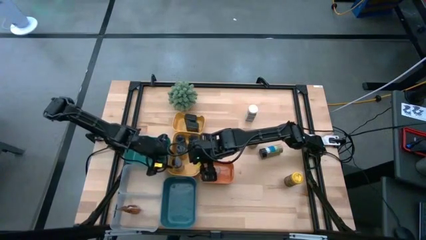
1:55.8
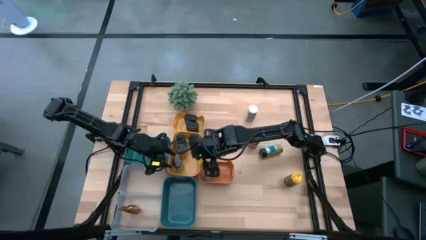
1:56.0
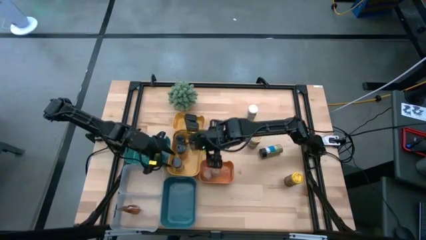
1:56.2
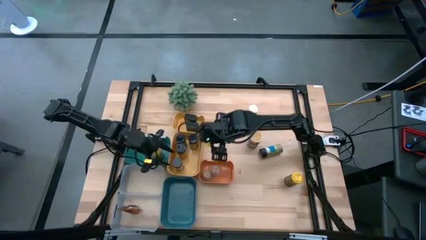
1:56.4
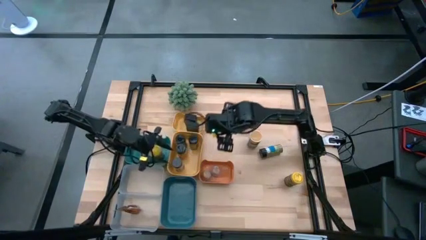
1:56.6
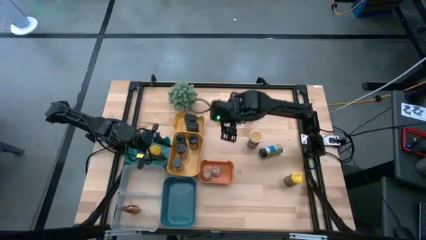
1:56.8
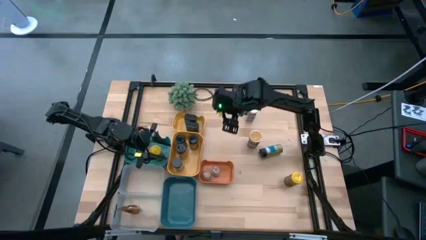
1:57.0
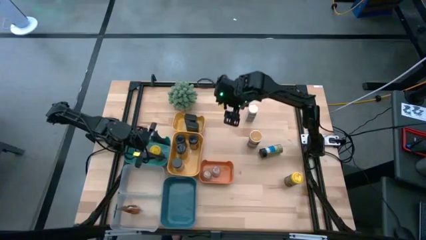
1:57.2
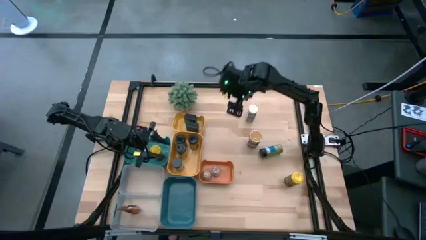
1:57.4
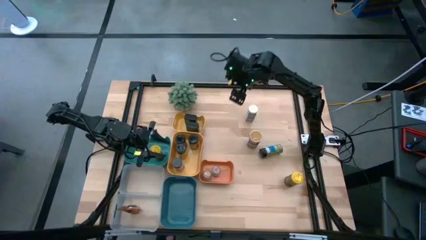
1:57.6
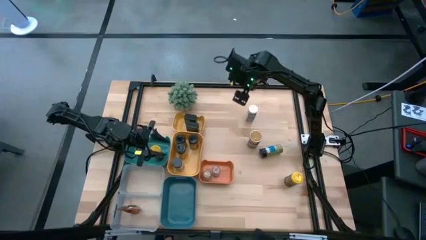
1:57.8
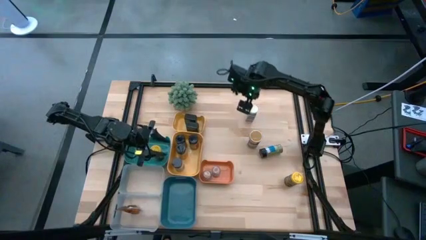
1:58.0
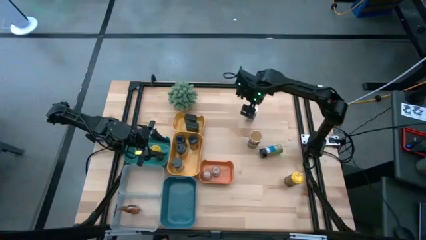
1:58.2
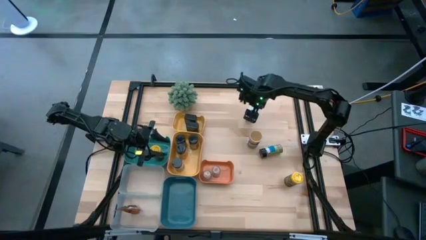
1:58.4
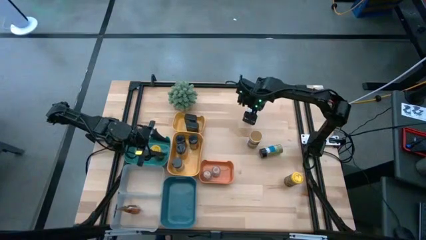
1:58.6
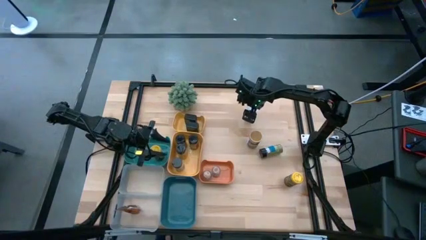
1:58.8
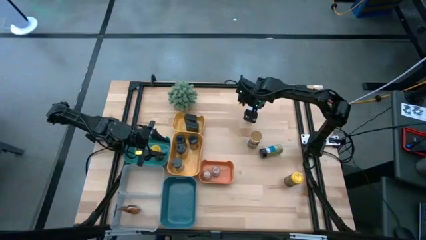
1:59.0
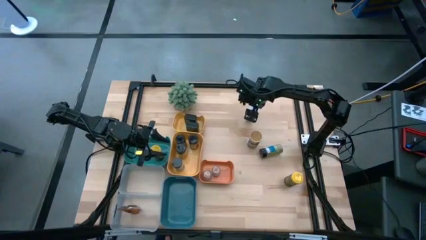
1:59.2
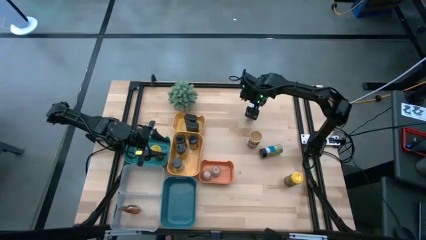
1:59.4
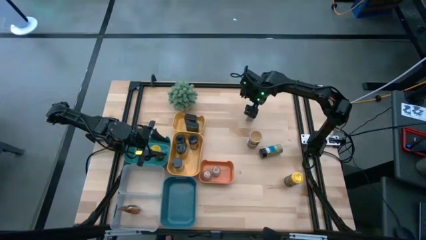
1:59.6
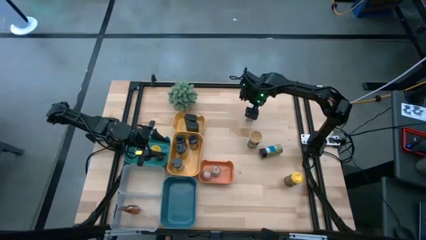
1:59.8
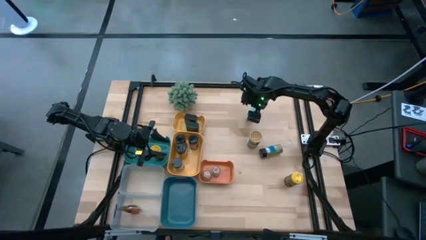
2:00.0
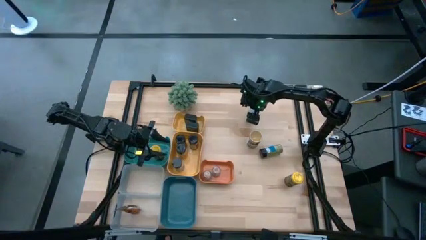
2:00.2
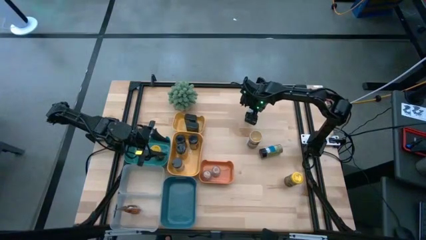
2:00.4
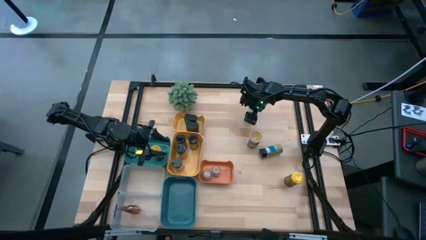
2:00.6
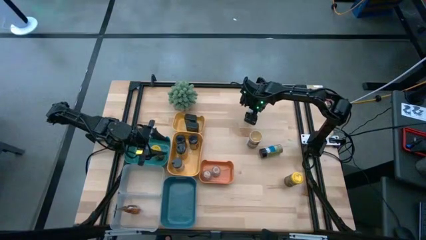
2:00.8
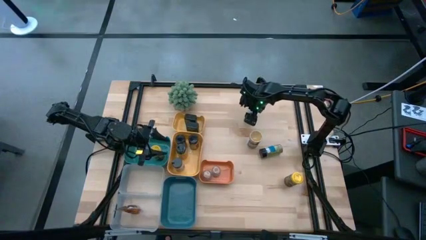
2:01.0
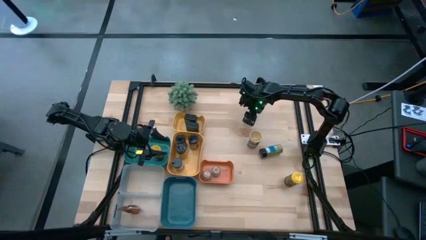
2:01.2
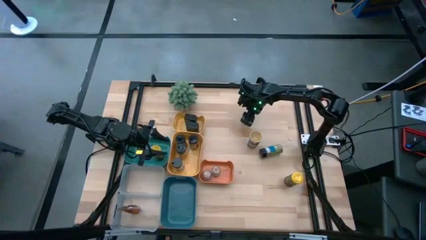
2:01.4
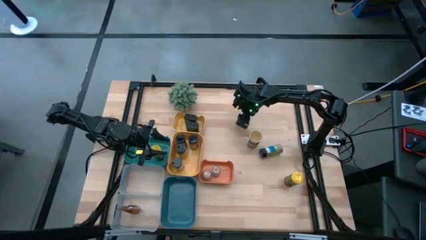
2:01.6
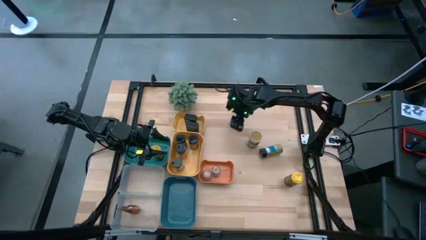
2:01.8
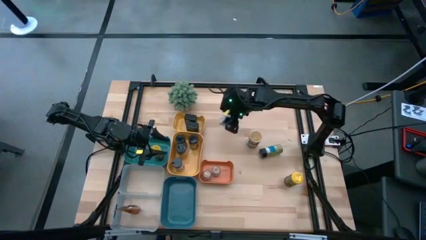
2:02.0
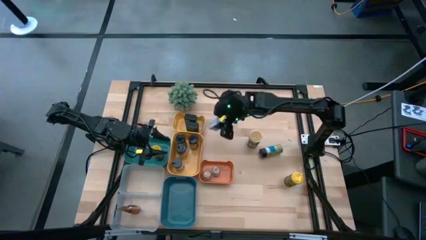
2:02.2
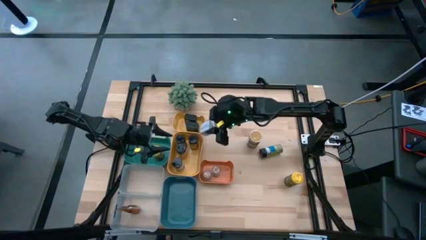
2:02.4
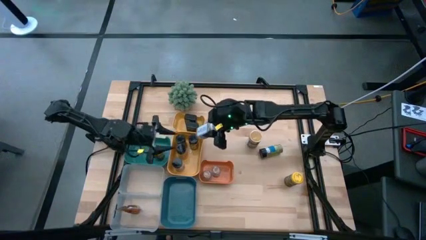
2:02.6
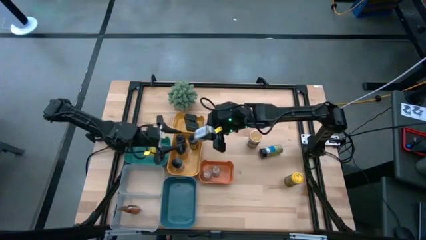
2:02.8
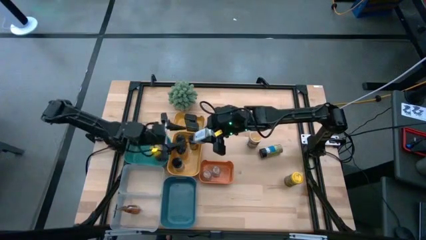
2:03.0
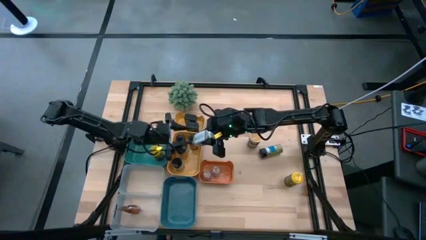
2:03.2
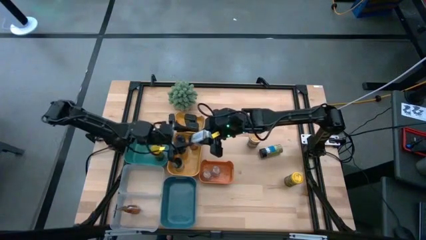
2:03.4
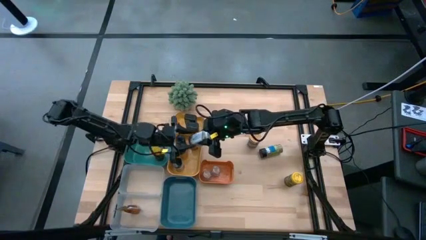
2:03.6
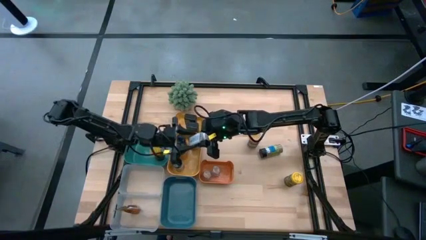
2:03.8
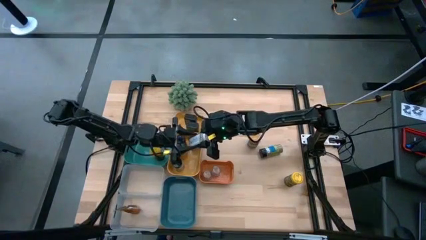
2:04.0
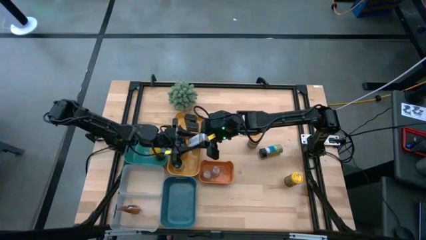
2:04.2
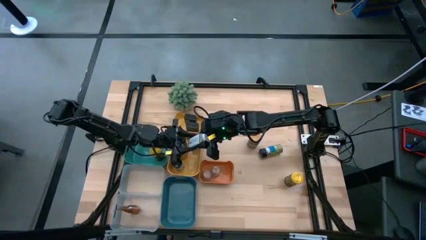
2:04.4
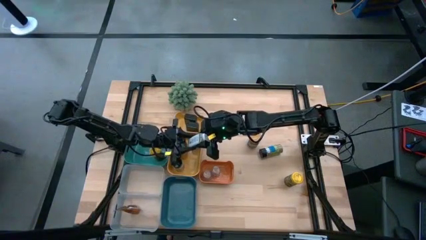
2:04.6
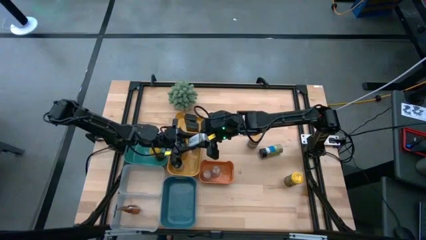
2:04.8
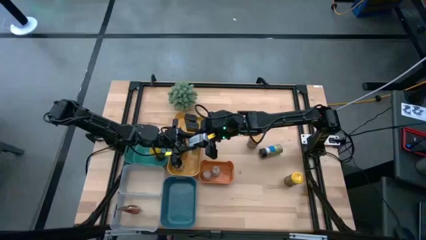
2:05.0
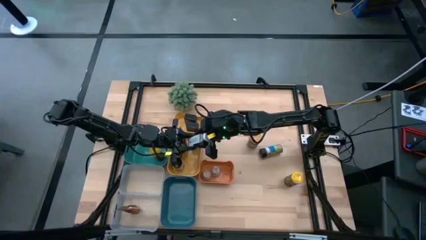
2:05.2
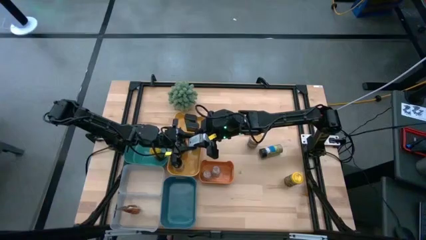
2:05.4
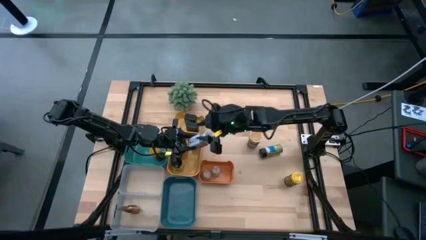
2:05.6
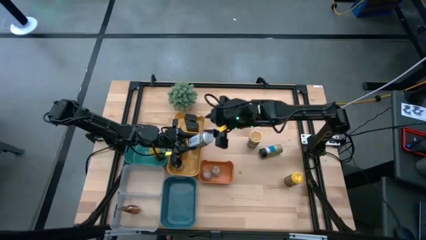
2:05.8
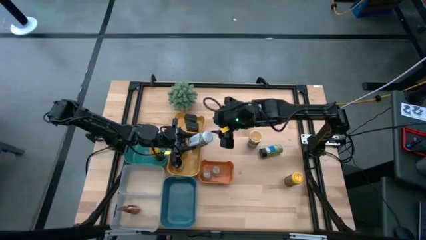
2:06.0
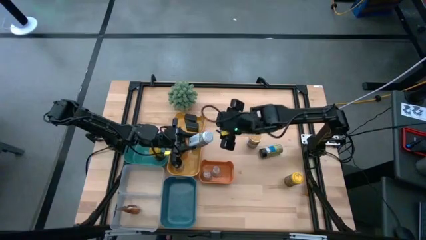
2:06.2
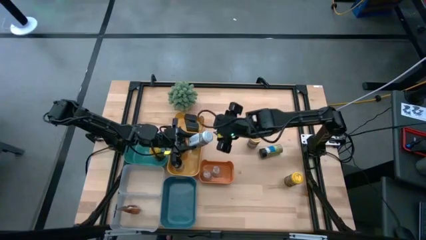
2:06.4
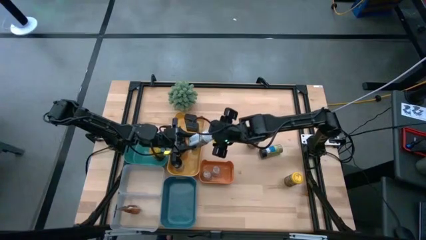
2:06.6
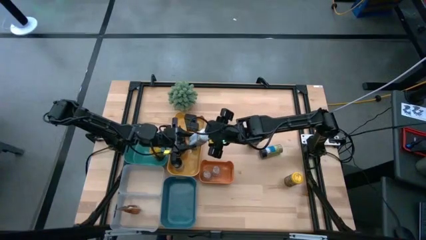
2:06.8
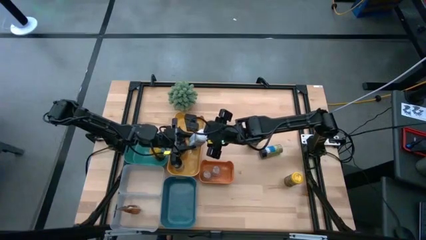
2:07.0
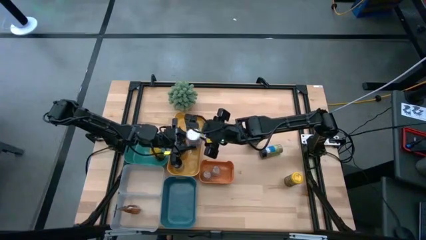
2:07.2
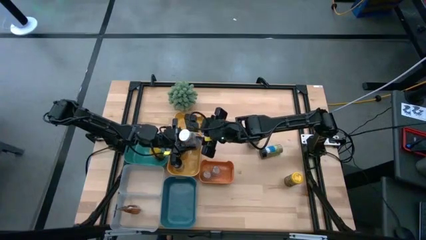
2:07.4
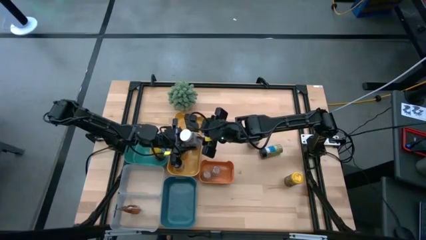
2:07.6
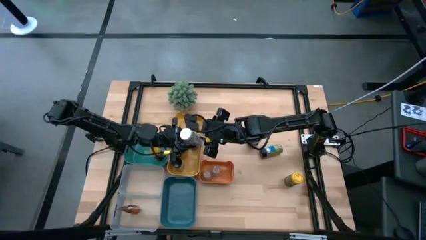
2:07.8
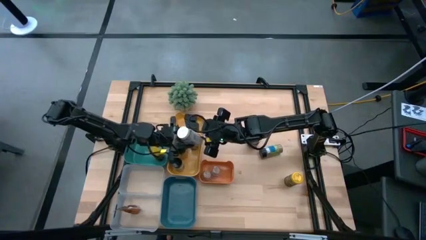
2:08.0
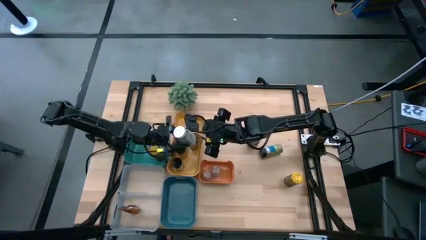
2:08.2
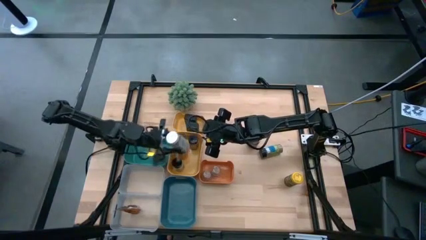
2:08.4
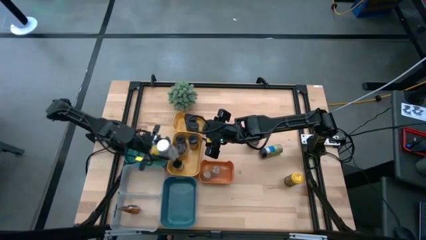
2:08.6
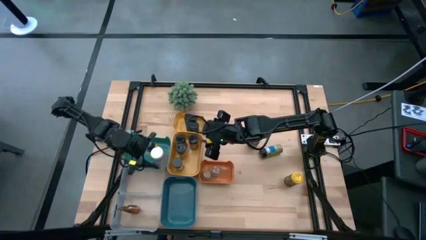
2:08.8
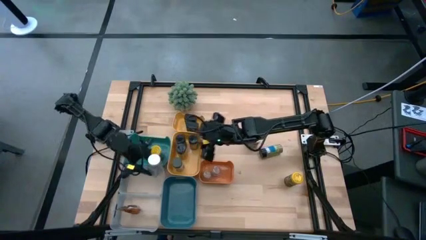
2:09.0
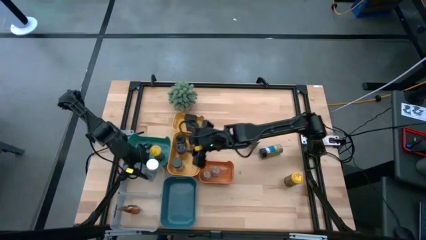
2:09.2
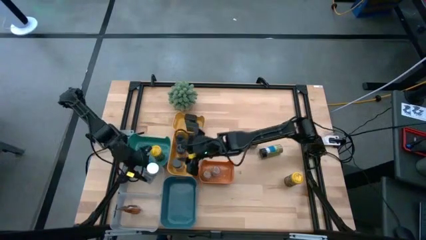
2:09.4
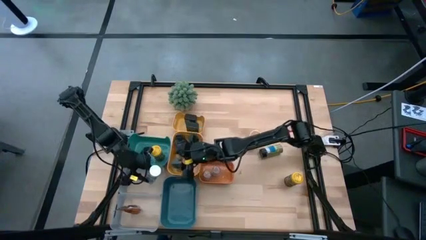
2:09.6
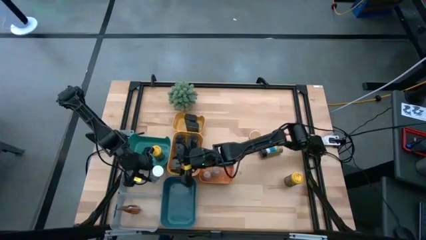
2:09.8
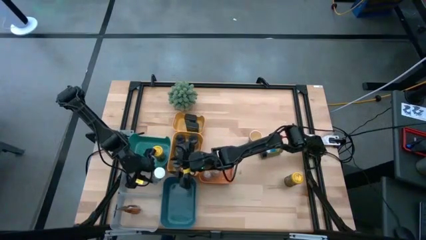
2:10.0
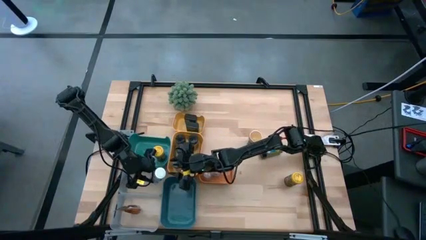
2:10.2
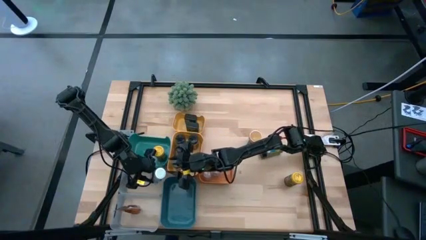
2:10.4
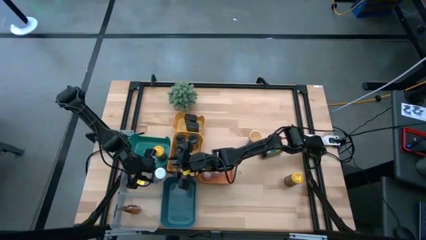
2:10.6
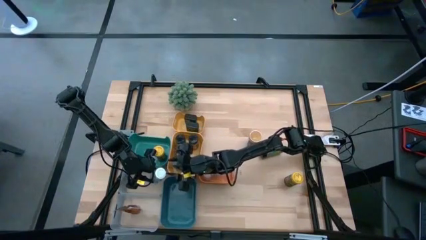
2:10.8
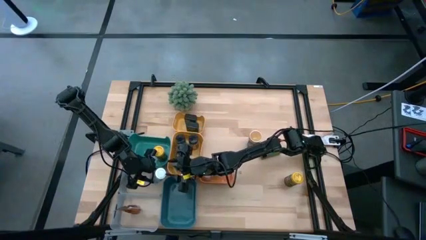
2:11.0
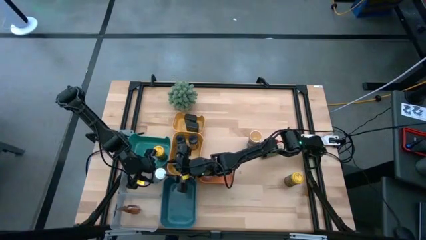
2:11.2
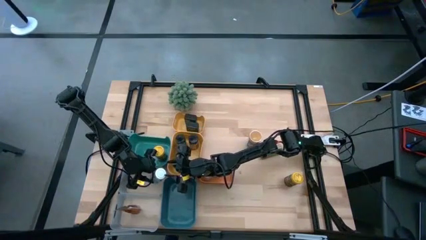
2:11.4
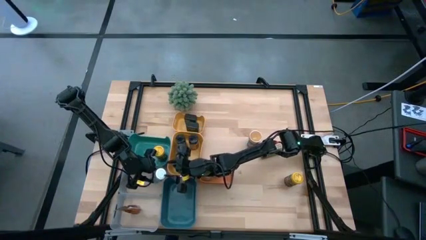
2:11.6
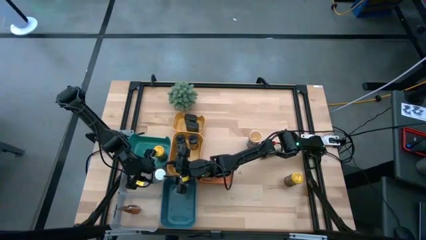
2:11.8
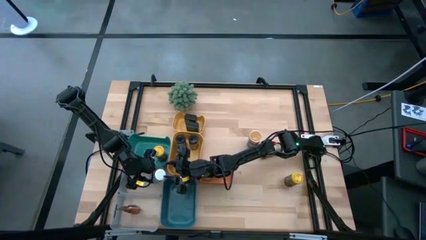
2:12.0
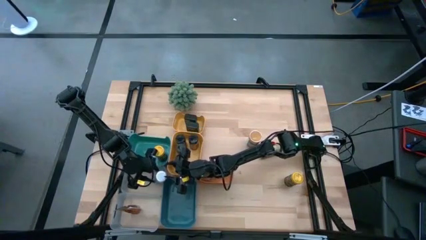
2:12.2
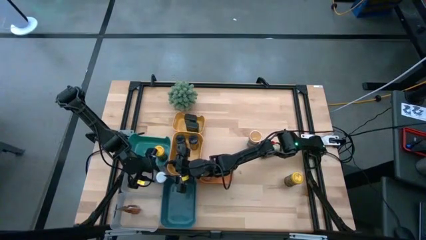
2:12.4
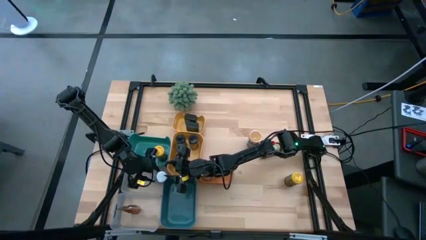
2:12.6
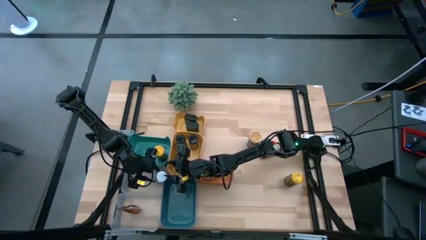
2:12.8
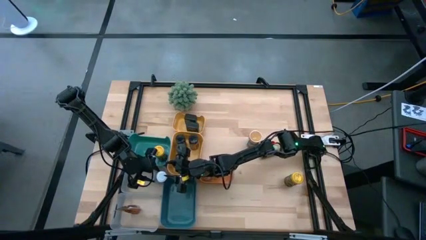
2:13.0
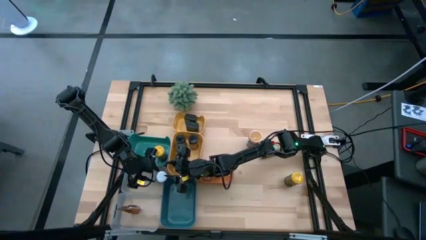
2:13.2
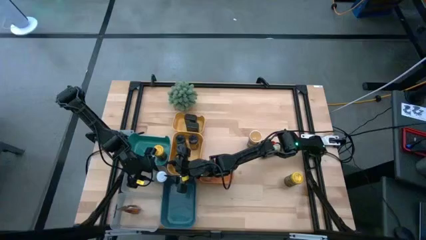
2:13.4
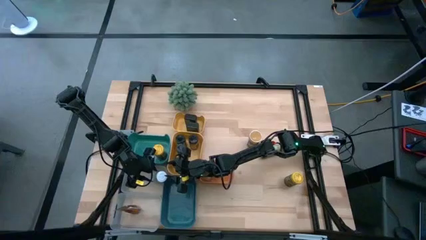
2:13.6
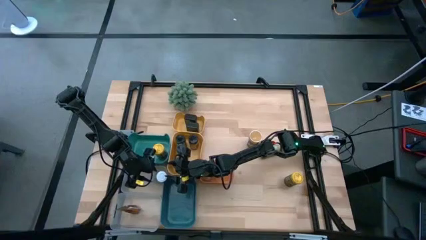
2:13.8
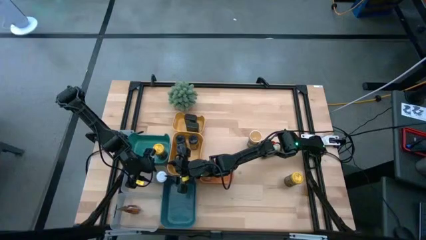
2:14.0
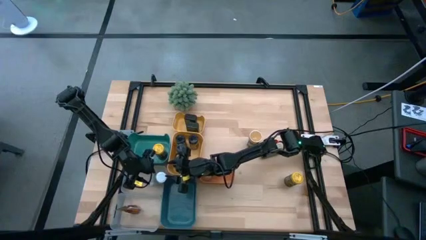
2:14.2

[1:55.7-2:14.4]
Task: Sort spices by type
Put the white seasoning bottle into the top transparent bin
